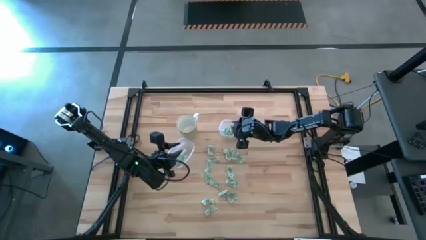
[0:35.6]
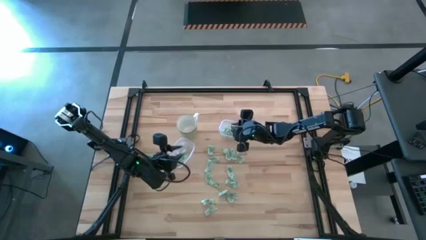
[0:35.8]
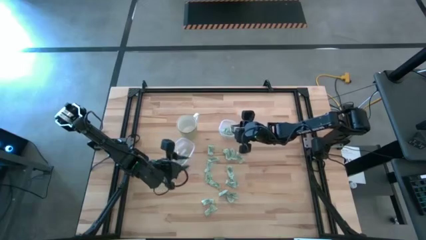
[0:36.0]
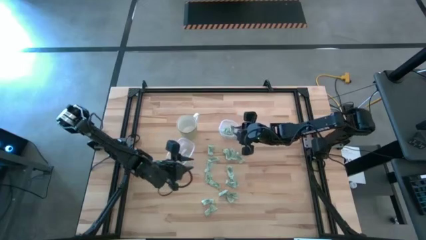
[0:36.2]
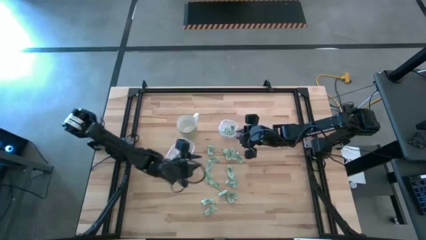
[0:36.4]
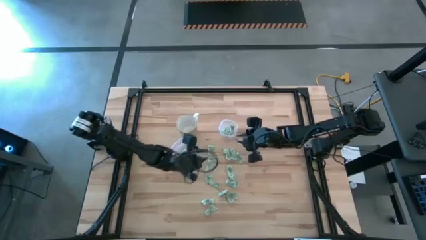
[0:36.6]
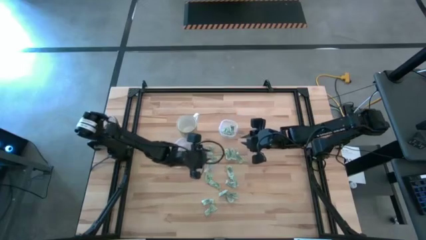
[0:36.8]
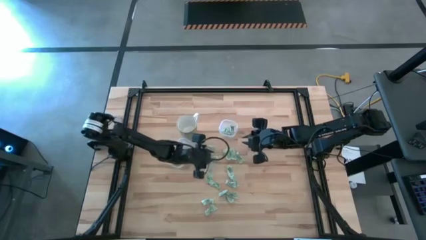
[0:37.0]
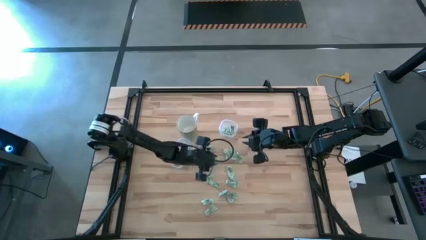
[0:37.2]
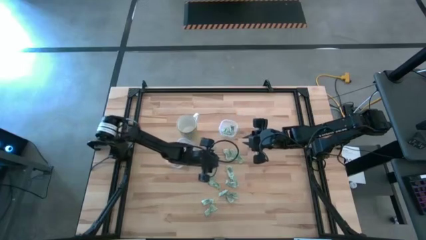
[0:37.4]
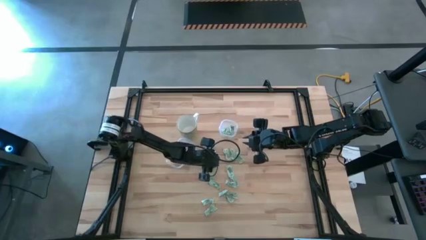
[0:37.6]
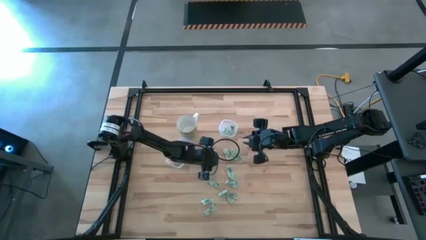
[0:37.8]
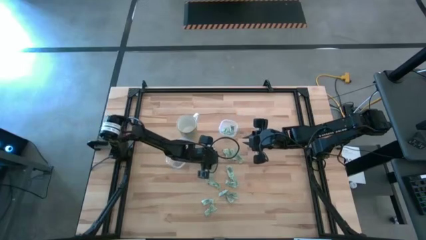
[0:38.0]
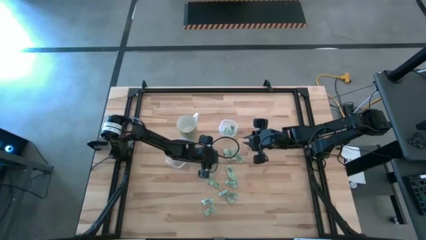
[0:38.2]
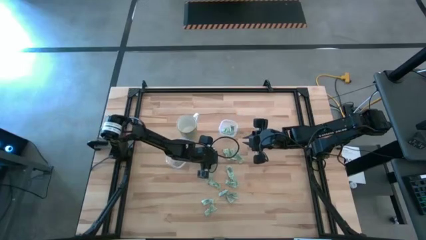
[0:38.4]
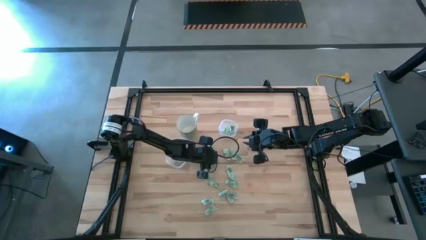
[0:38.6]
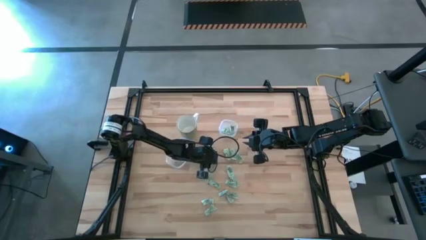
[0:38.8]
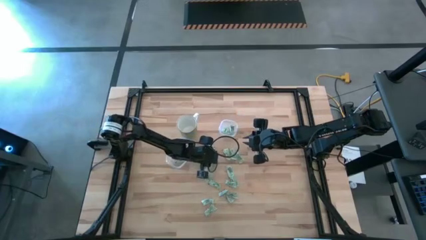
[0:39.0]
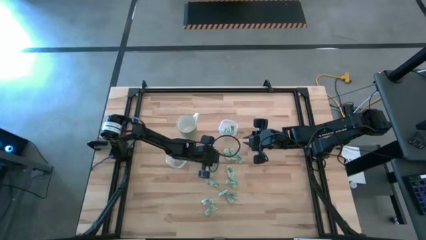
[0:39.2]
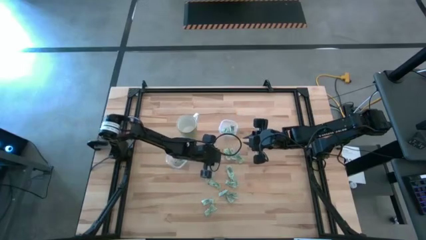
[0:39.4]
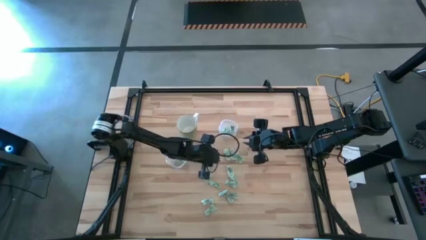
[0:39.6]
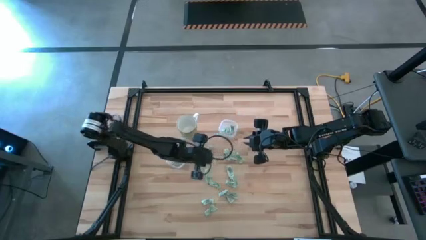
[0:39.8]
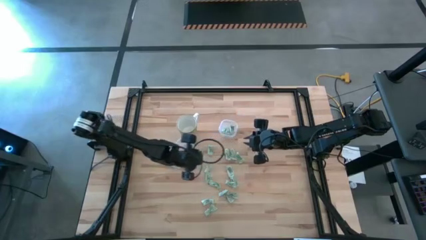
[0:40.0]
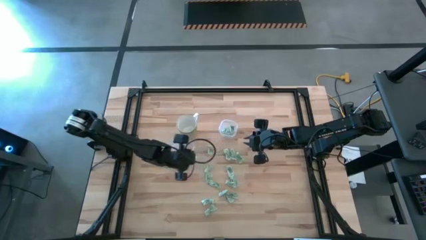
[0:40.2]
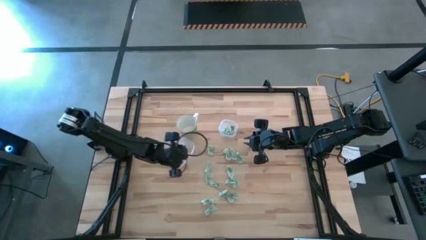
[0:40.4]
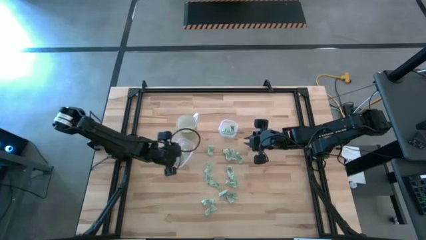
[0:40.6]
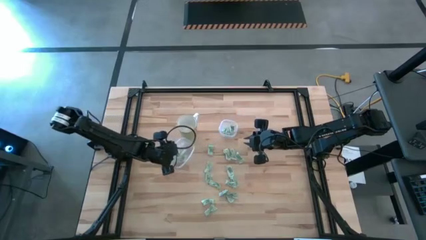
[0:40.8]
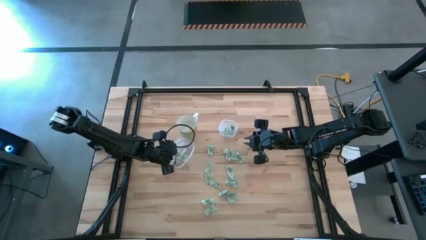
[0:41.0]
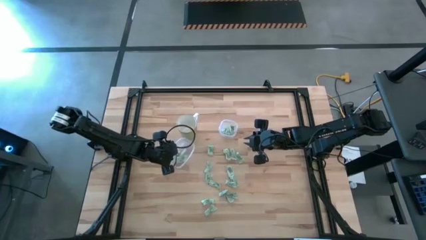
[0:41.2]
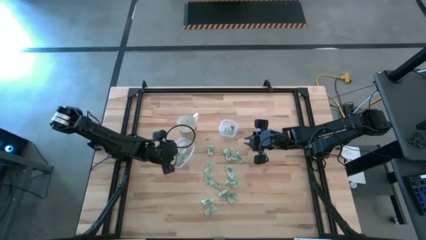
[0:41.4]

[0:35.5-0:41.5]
Task: Pick and place items into bin
Put the stevia packet into the bottom transparent bin

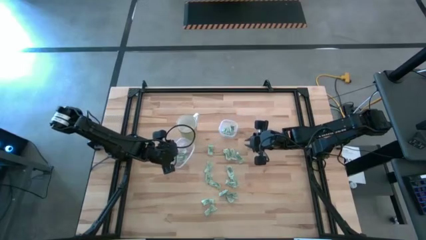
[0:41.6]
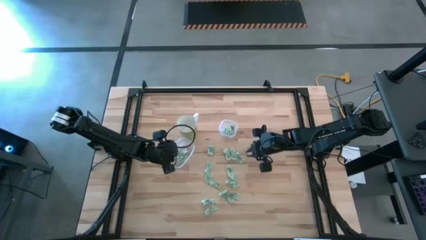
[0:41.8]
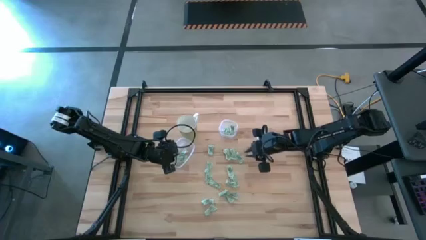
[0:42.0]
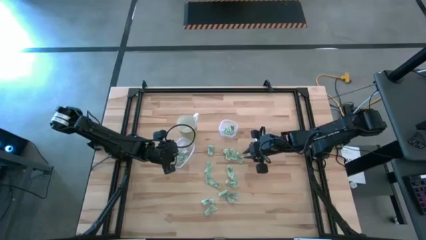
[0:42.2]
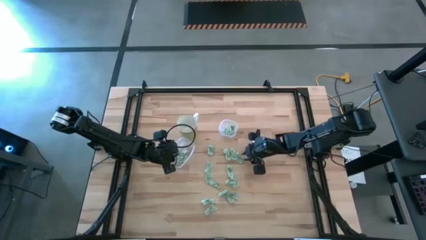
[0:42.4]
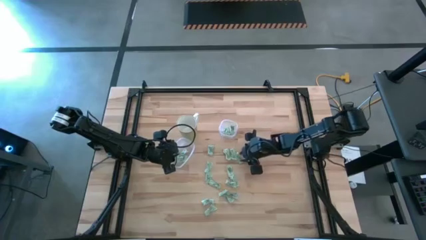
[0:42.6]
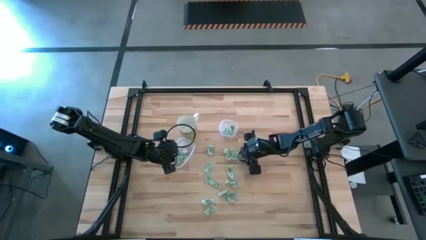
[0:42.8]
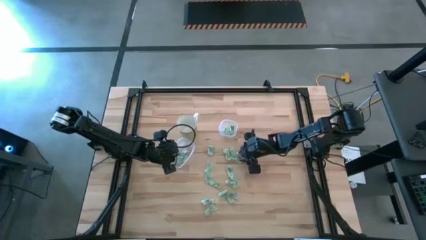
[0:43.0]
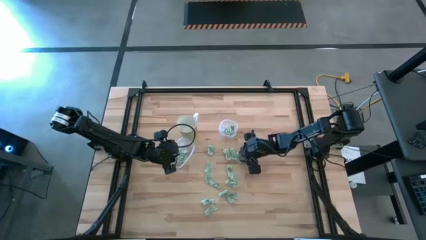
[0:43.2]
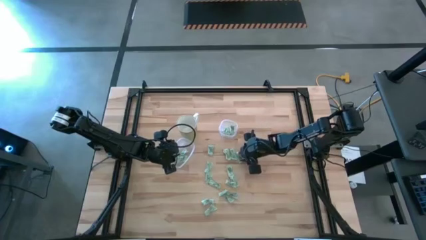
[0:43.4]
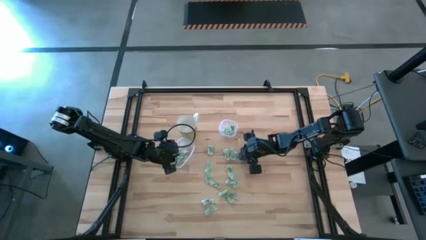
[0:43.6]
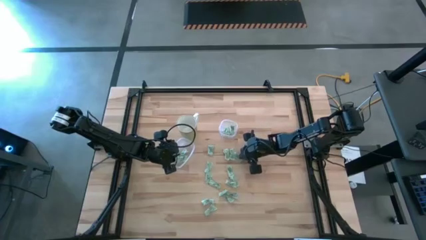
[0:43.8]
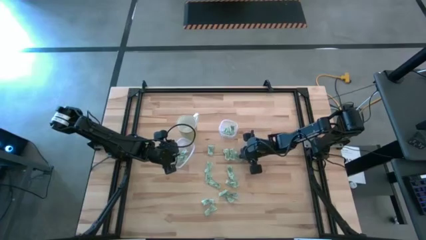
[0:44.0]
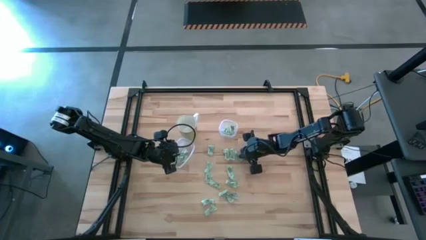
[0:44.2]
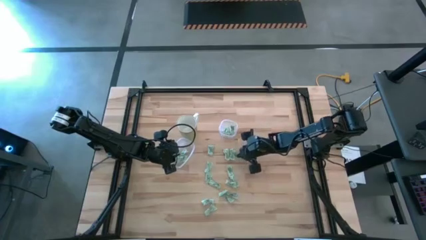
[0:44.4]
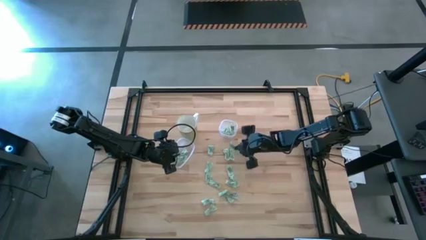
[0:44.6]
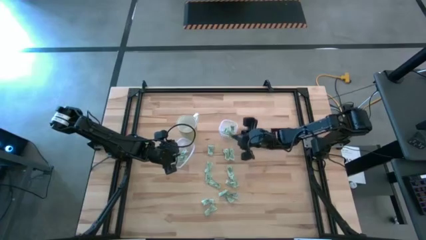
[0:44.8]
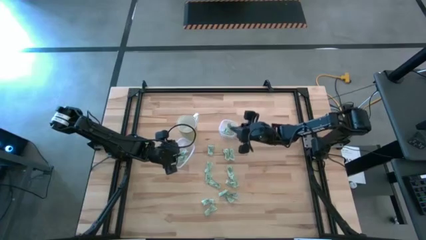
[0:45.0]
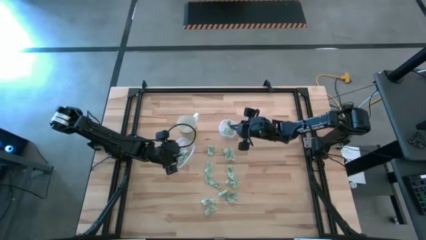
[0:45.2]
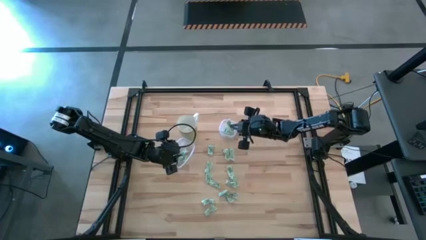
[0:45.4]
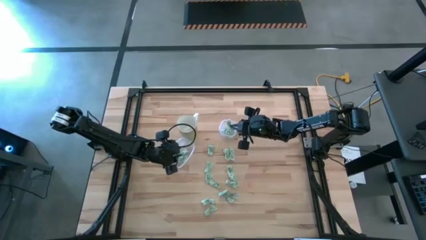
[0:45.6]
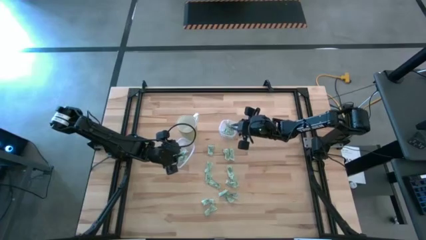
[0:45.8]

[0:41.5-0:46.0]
Put the stevia packet into the top transparent bin

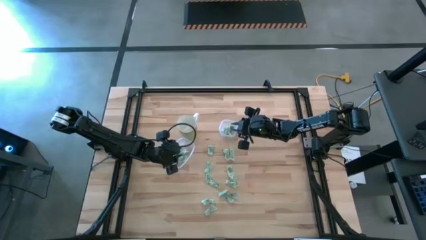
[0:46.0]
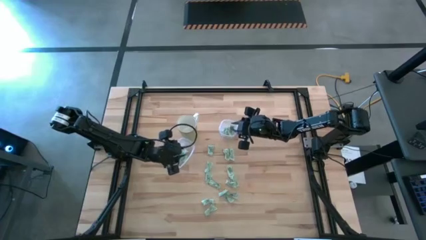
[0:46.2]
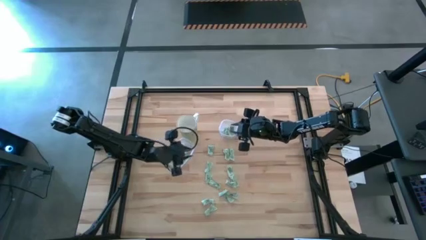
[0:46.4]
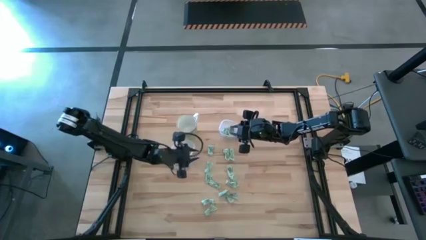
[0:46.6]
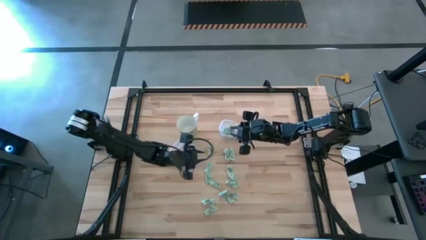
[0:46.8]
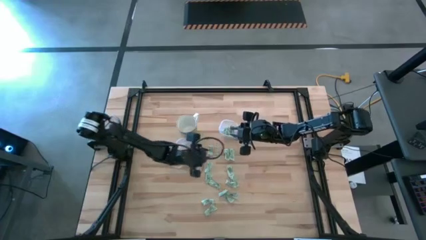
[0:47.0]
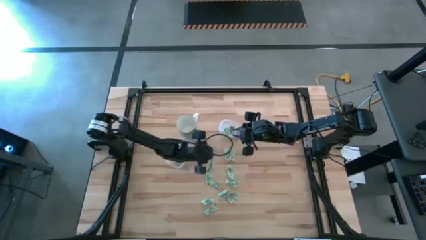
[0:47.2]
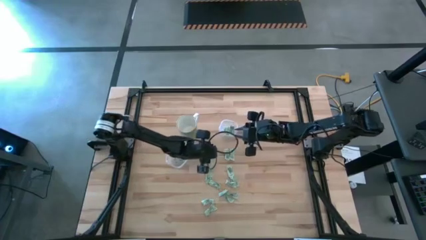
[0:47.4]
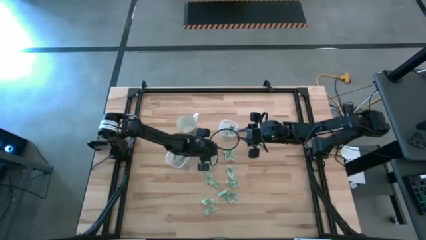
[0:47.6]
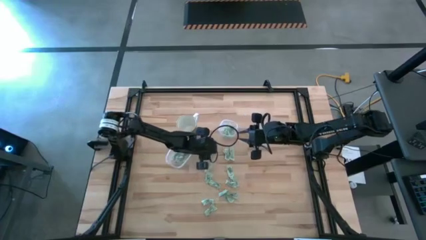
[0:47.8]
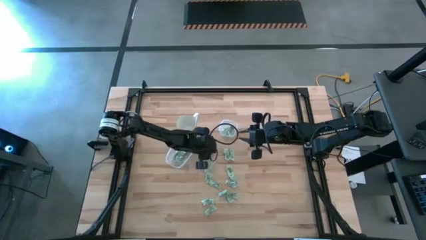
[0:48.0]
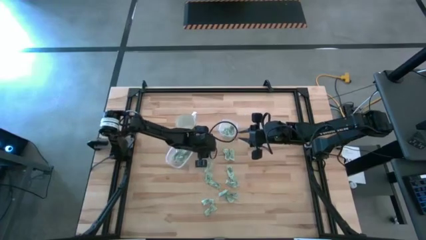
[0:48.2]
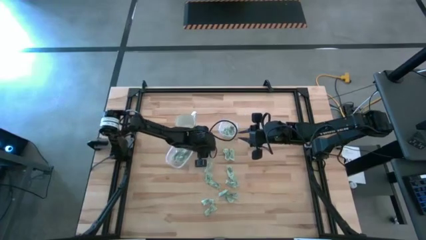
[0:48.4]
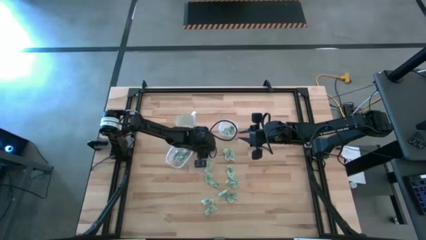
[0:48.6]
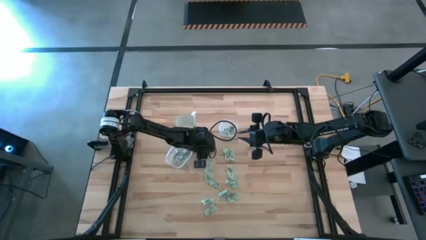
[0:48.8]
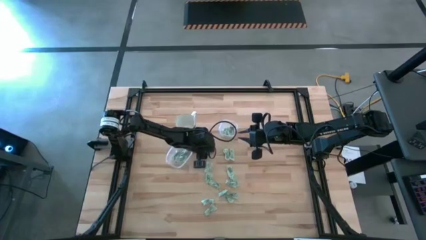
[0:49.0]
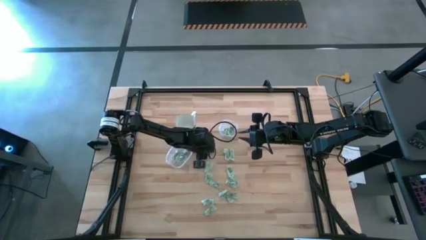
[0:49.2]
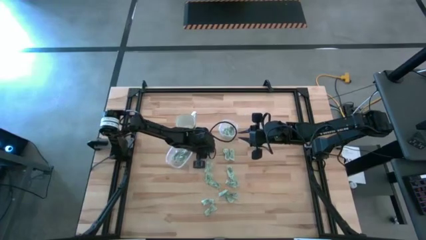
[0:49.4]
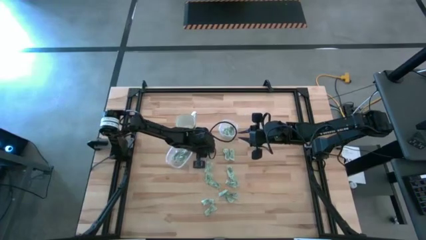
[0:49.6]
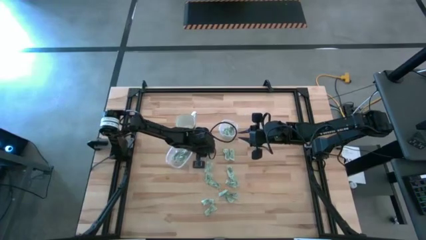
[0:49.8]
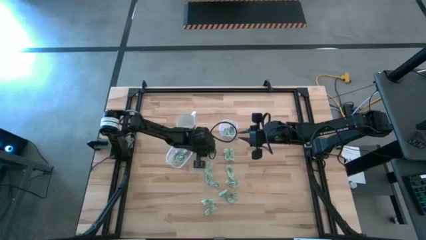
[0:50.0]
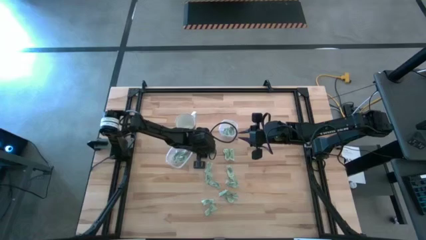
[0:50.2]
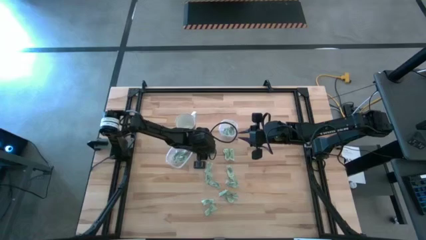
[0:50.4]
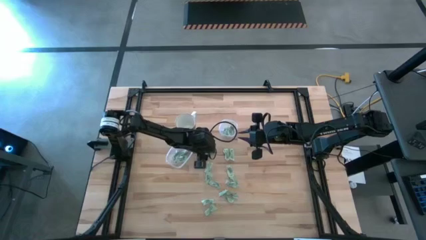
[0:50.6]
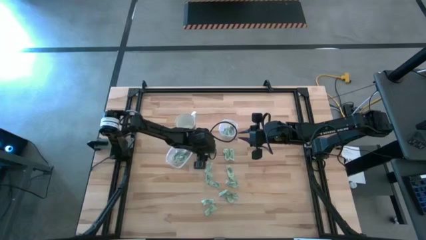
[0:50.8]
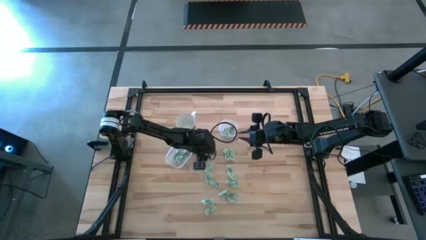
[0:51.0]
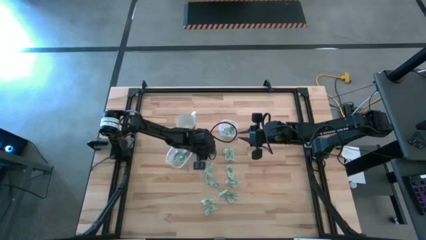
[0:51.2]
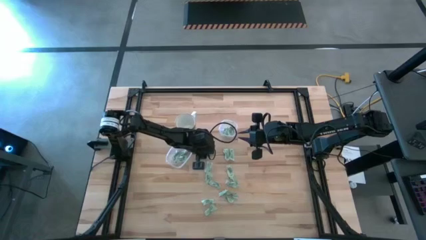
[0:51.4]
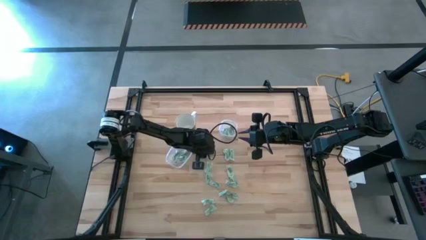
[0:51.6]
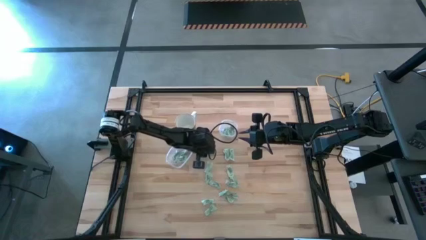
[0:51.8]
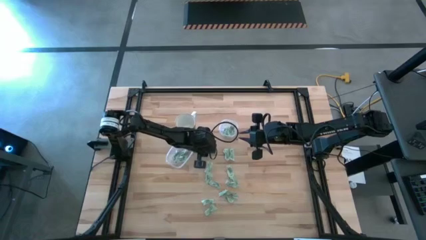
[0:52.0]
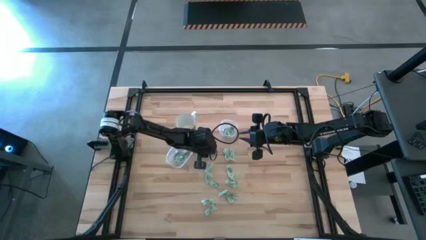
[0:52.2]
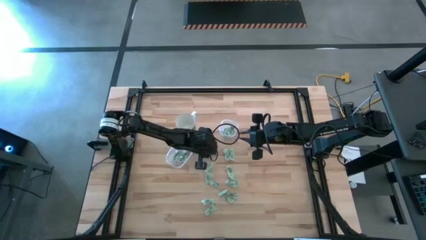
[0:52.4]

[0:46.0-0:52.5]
Put the stevia packet into the bottom transparent bin
